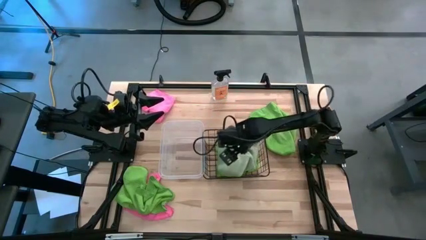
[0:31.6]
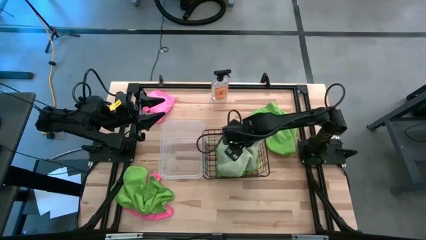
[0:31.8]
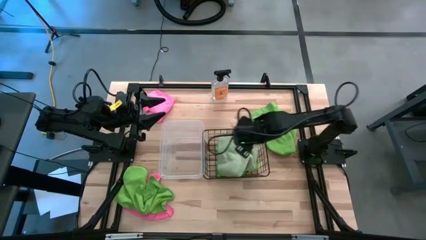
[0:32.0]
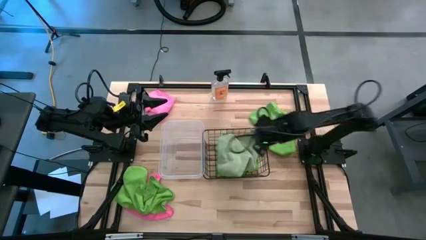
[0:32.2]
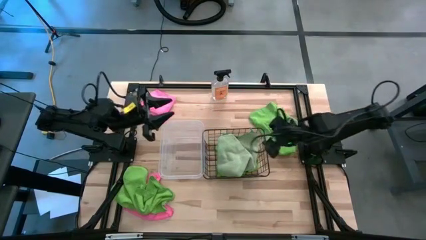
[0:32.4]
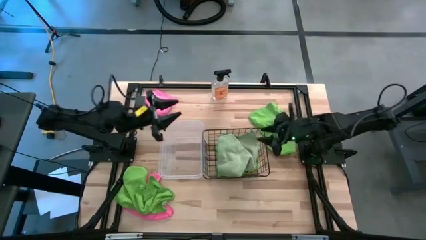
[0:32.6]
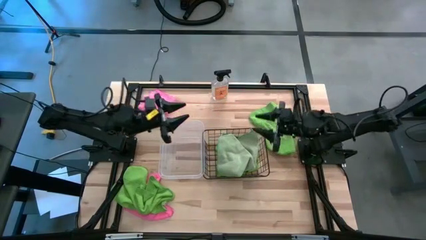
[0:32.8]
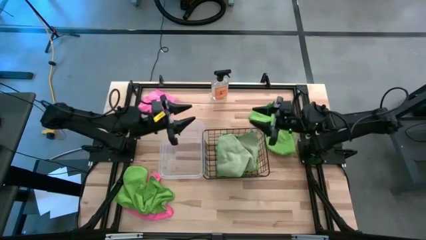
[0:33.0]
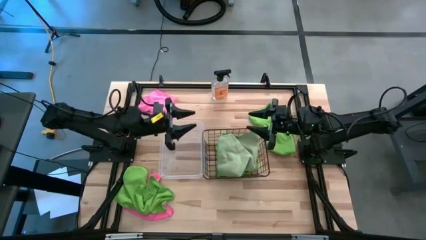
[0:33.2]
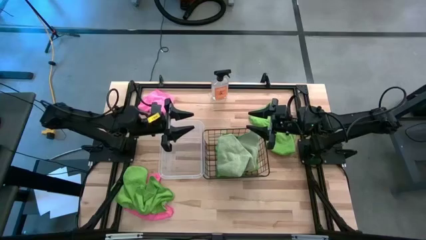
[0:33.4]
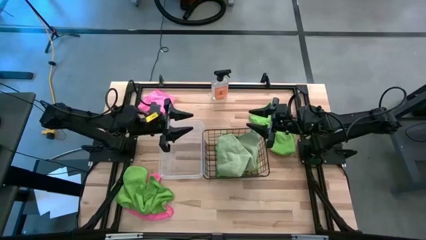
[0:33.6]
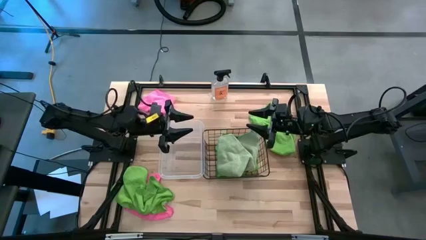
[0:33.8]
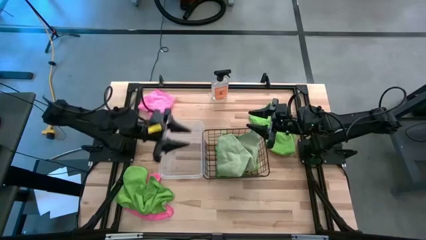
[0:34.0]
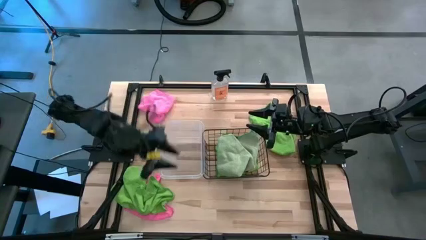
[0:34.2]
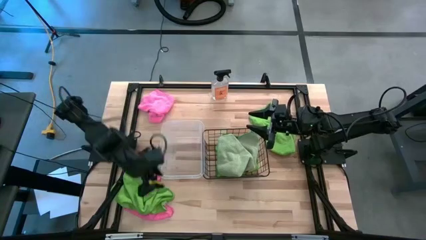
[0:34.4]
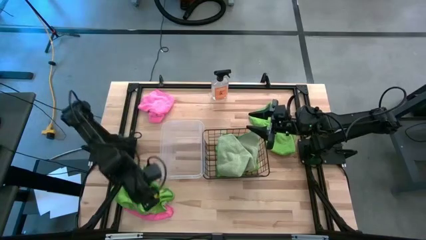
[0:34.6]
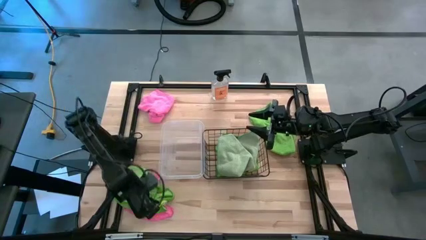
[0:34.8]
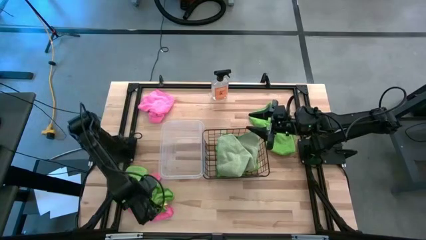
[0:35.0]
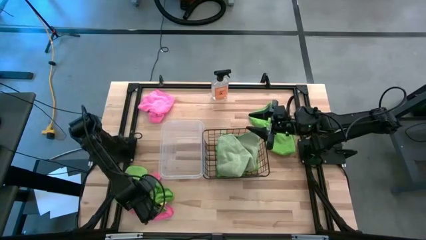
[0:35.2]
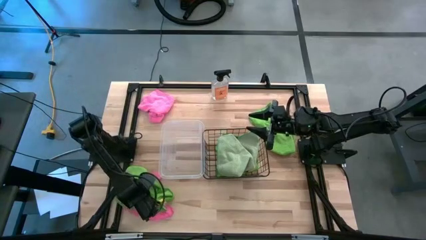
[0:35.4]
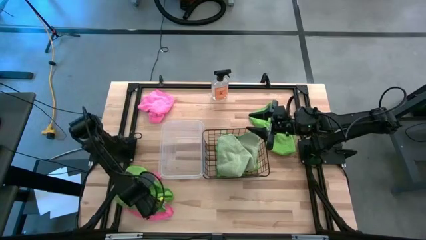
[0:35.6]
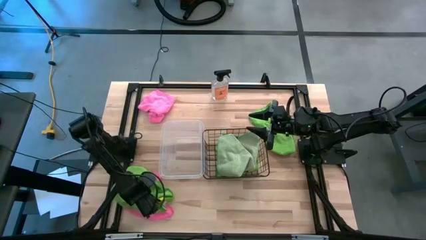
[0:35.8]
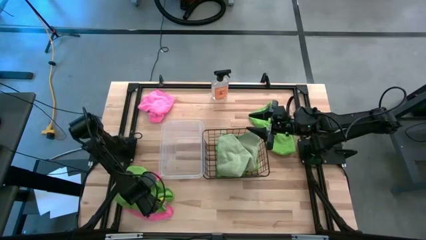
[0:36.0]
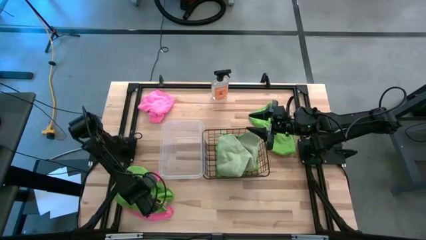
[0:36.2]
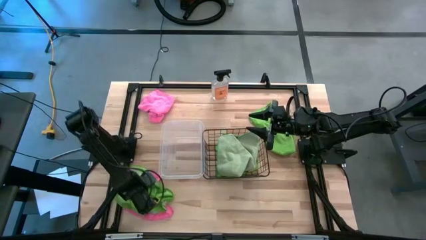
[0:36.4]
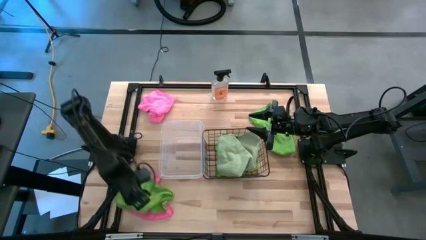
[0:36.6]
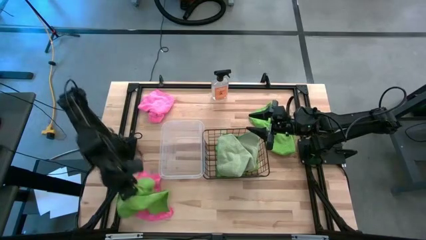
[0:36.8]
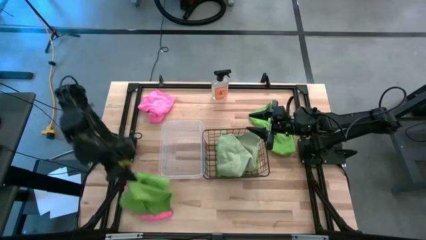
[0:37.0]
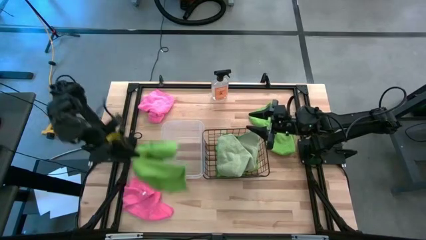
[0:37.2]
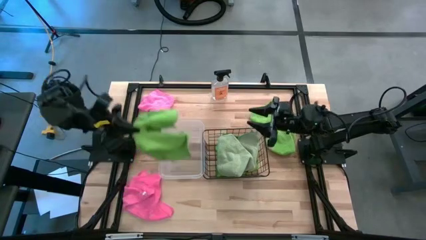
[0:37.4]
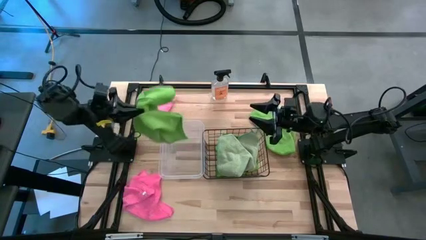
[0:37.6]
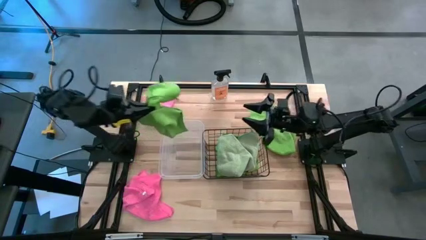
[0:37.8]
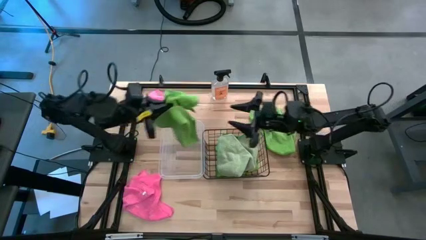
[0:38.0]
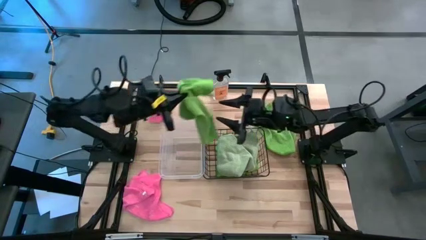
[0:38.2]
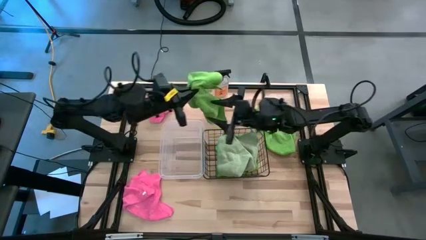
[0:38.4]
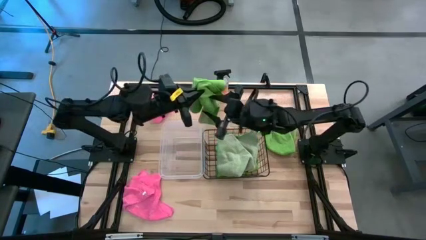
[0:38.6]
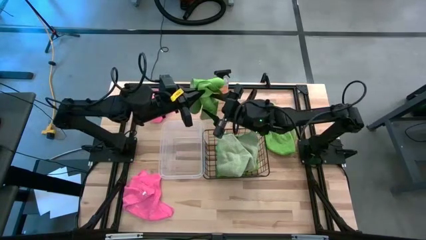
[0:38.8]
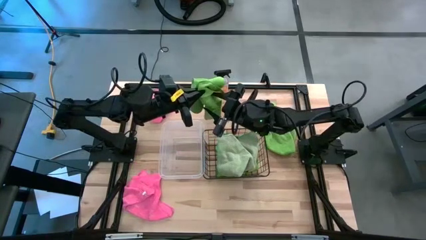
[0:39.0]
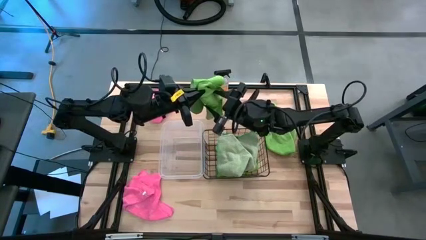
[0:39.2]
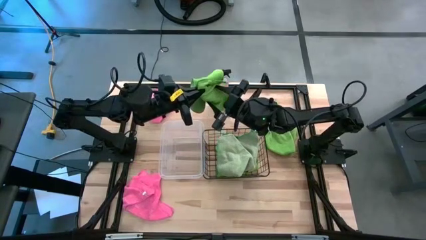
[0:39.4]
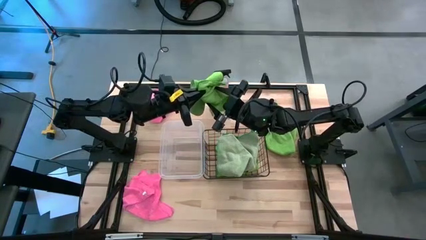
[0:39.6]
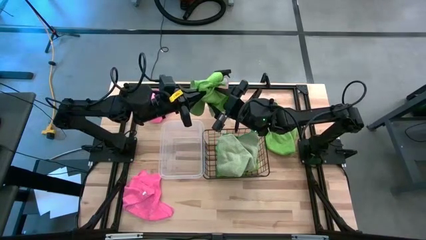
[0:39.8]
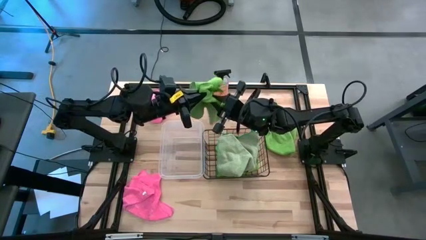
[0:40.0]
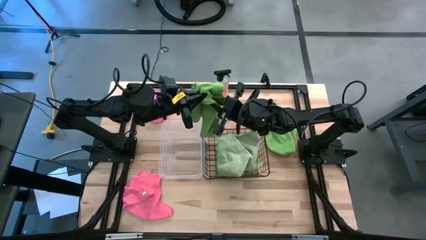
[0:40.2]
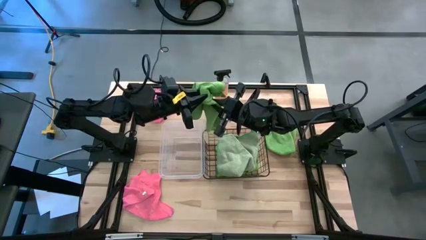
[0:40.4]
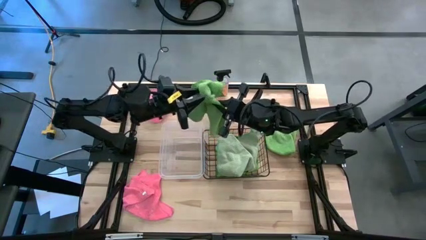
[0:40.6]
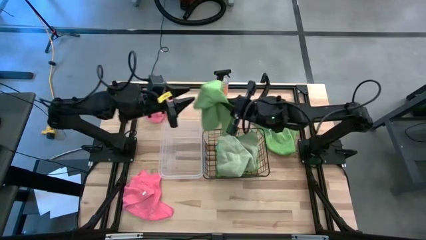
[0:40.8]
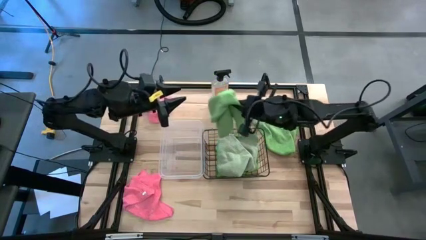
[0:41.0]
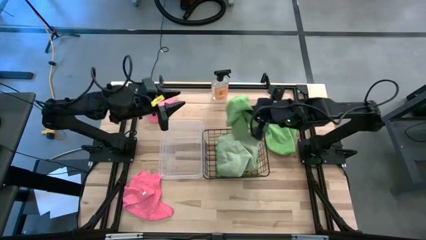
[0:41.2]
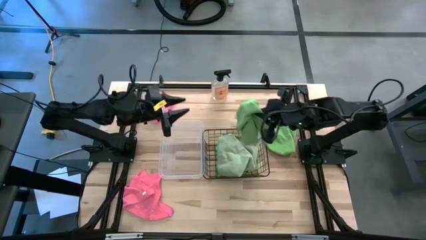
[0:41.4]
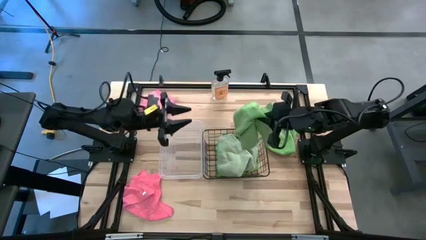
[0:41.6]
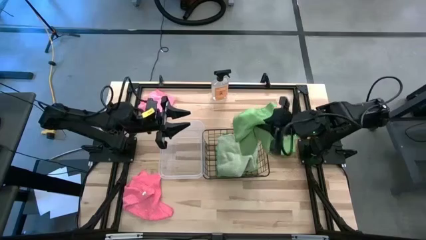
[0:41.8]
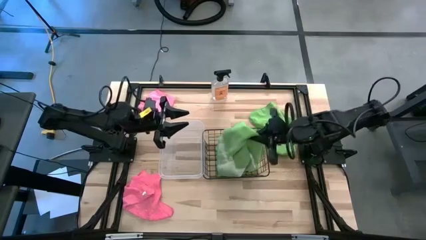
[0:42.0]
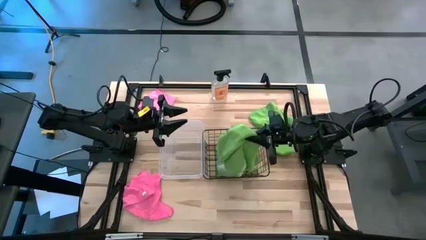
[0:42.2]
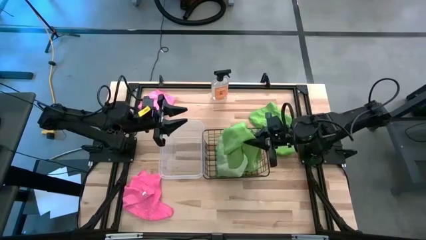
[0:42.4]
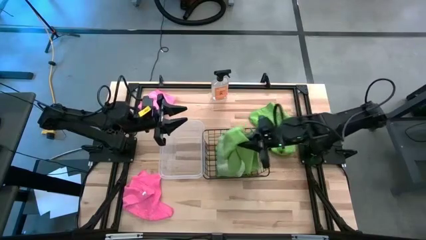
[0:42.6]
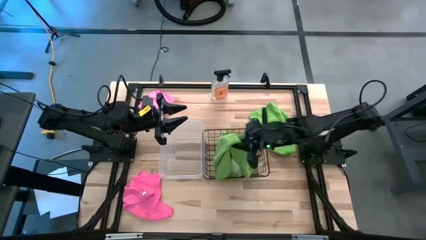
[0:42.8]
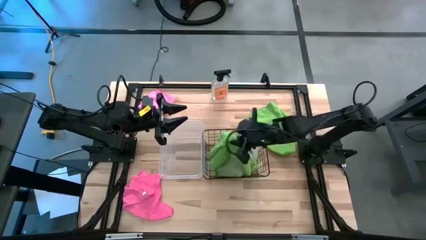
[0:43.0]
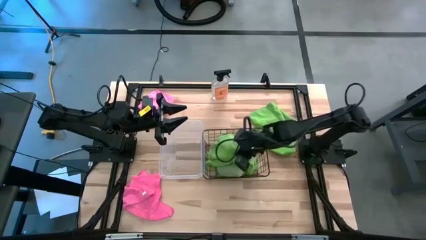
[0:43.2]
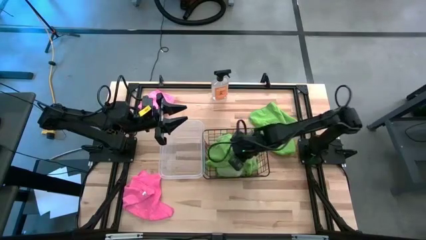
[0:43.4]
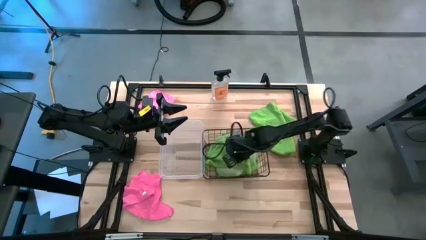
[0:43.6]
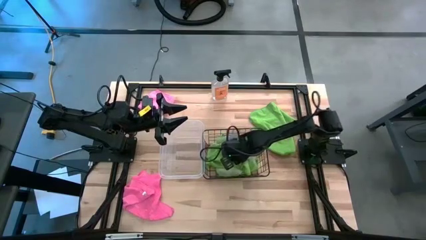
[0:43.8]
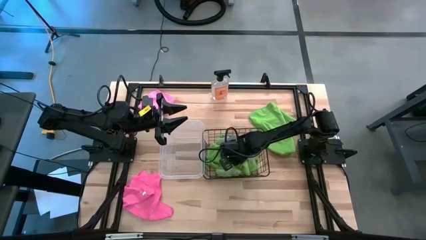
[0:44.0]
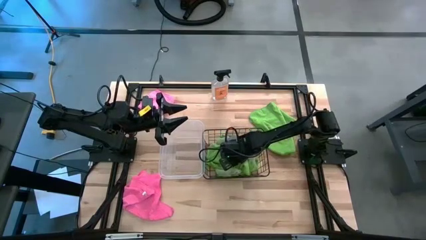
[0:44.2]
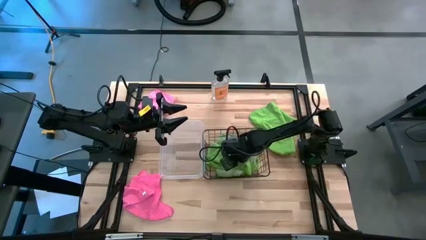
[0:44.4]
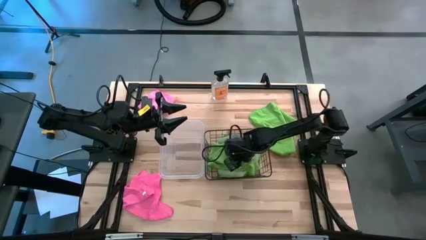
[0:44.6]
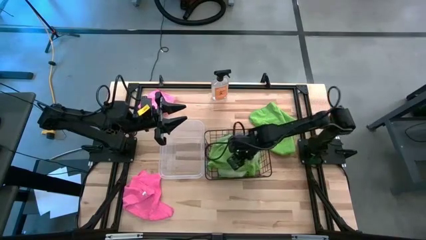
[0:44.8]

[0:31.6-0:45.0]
Task: Sort microfiber towel by color & place in baskets
Put the green towel into the wire basket

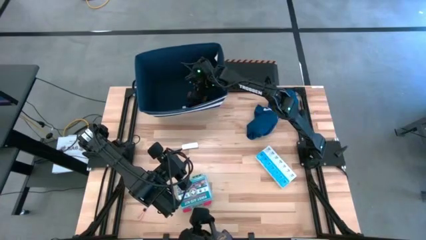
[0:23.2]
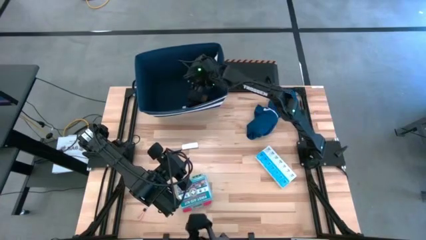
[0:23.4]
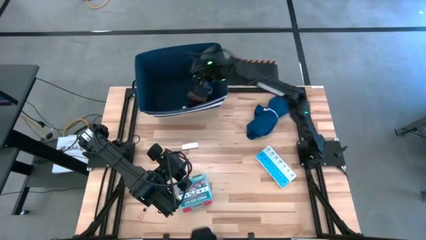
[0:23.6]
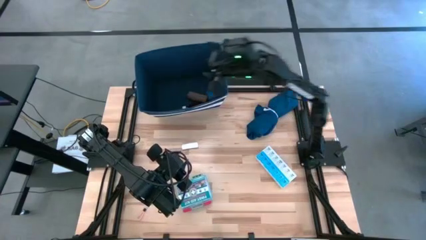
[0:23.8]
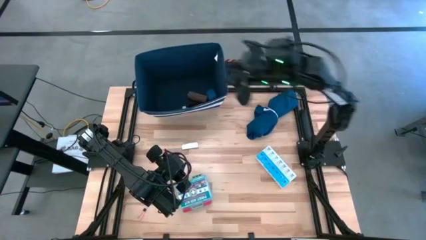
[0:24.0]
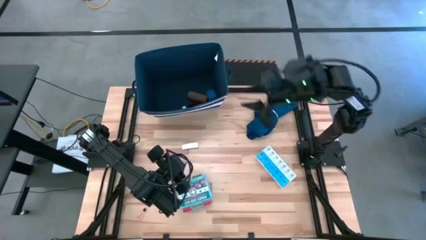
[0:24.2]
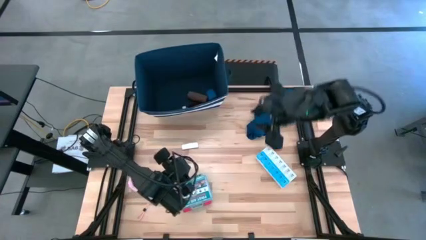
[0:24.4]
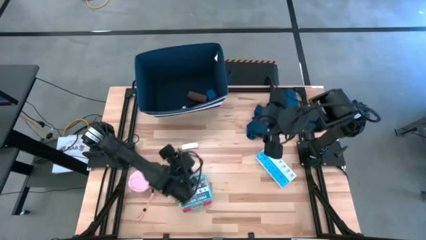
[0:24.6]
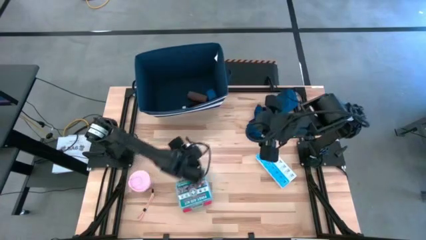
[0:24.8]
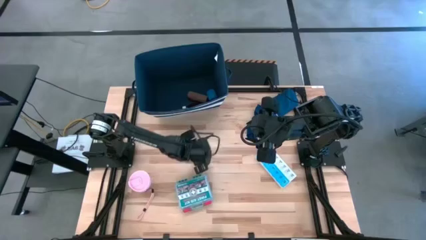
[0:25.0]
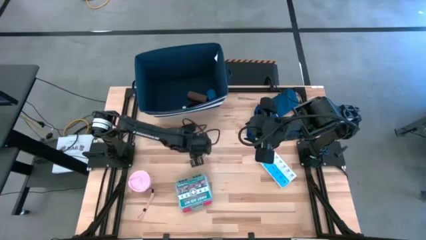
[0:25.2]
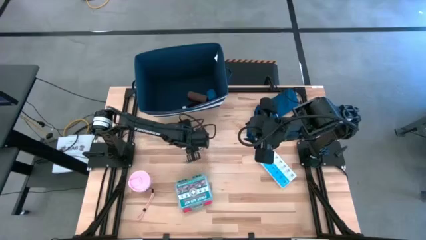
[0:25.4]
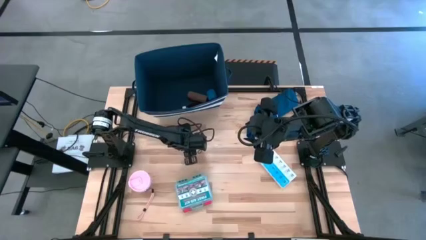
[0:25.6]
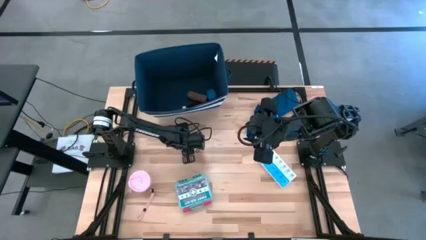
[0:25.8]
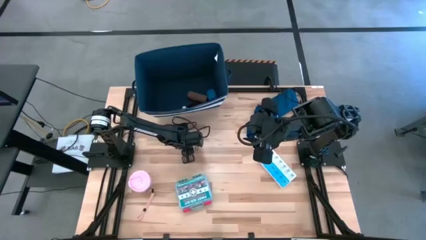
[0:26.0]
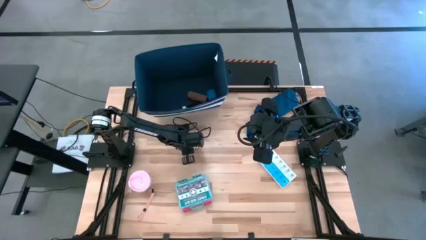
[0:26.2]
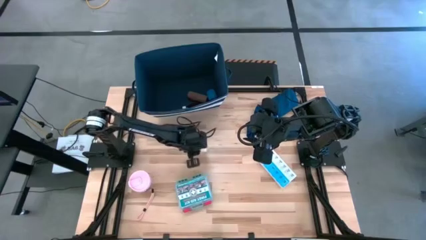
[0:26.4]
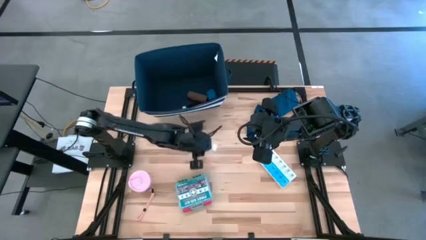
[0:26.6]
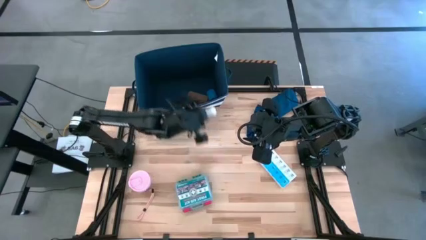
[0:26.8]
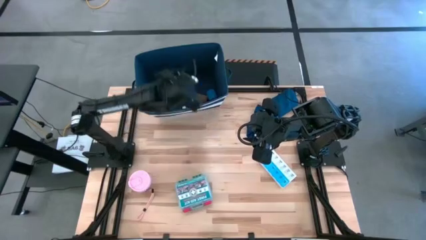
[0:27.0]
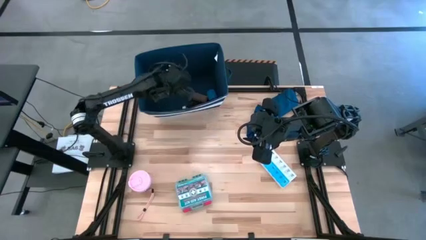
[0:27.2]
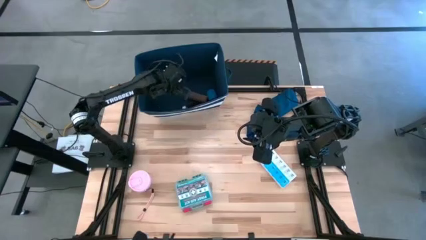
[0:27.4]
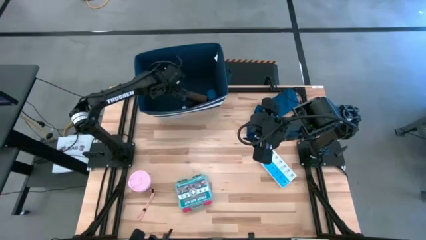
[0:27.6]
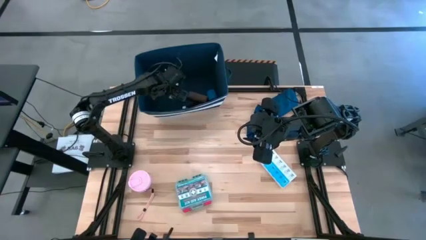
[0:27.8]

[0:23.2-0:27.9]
Task: Pick & place medical supplies in basket/bin
Put the rolled white gauze into the blue bin
